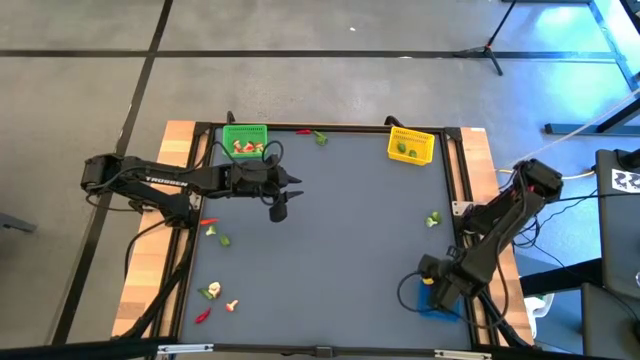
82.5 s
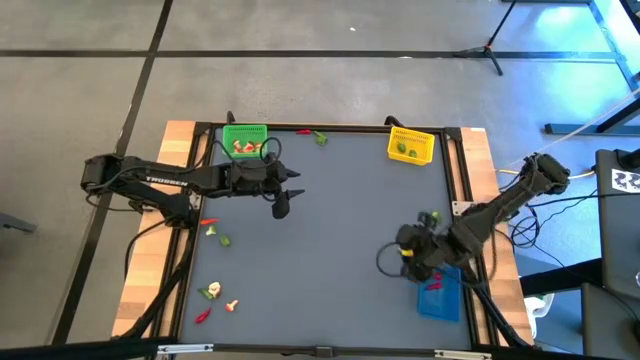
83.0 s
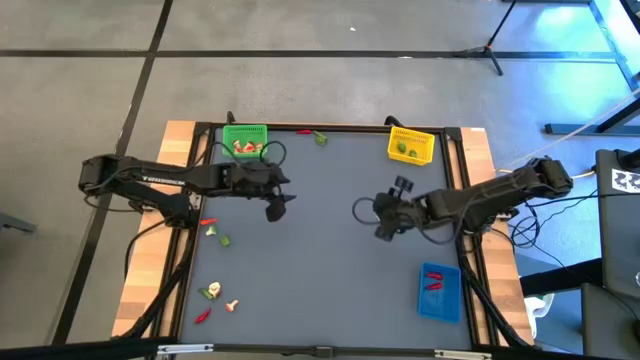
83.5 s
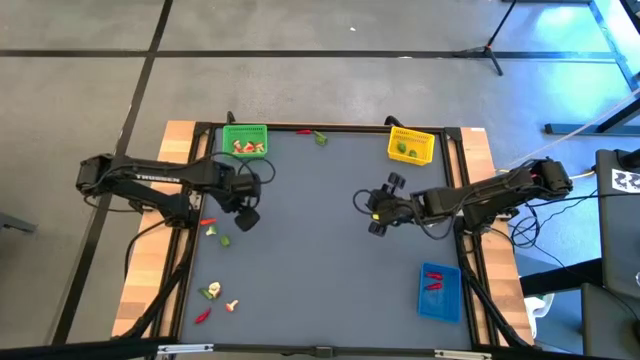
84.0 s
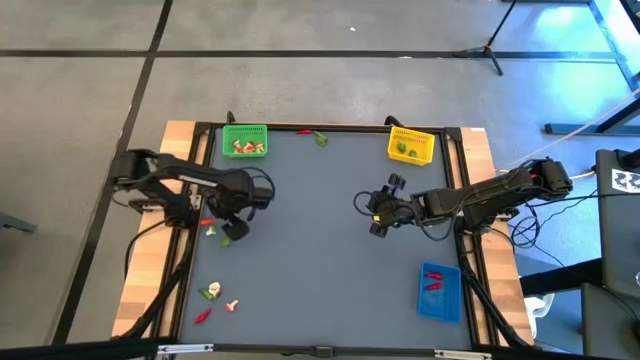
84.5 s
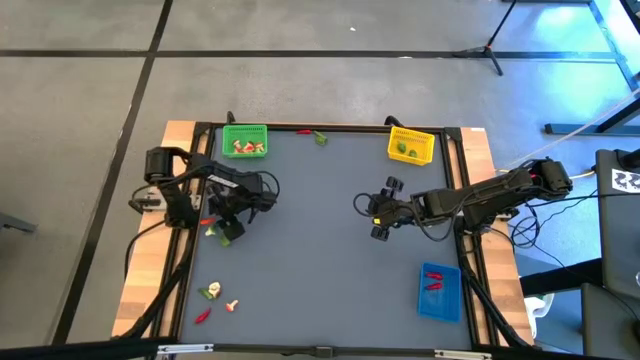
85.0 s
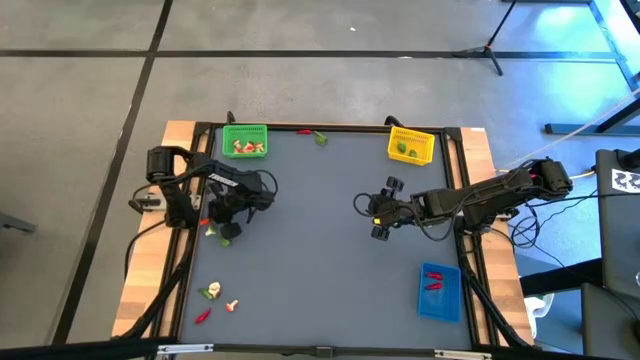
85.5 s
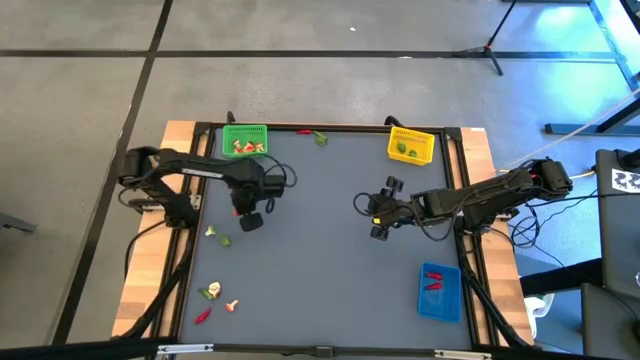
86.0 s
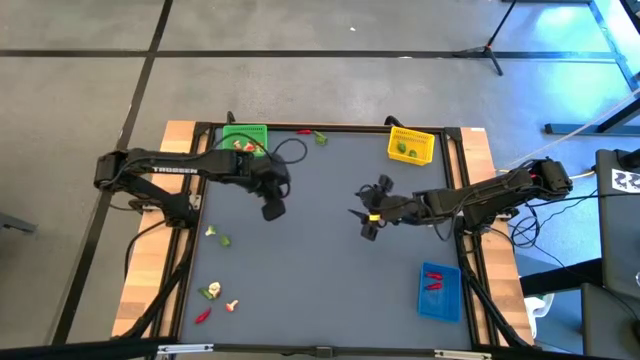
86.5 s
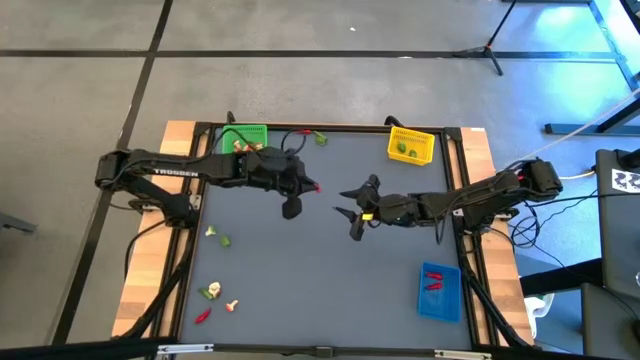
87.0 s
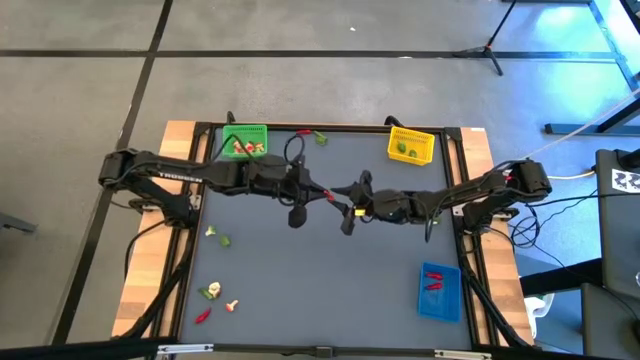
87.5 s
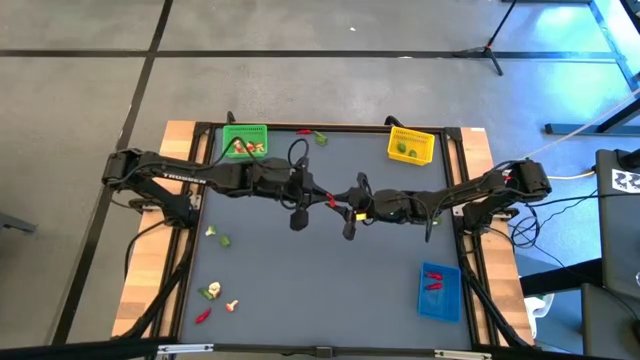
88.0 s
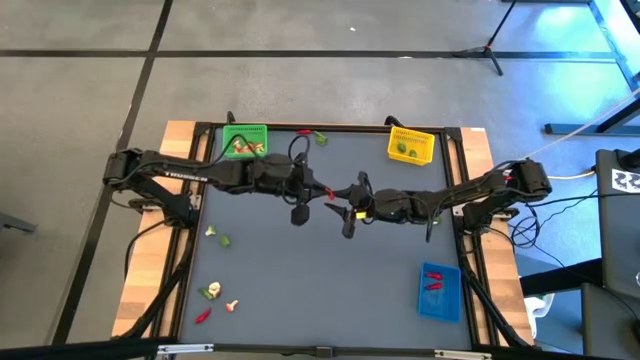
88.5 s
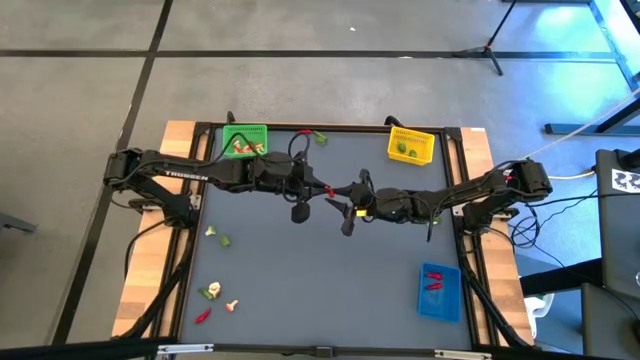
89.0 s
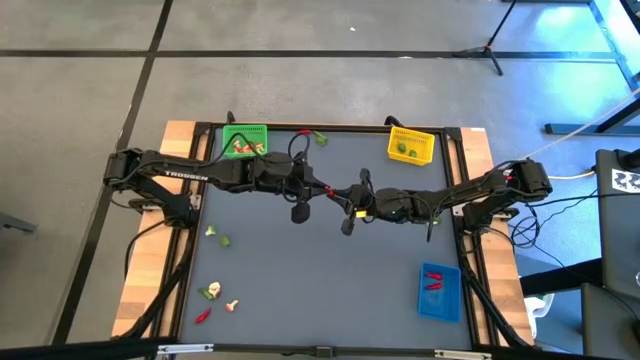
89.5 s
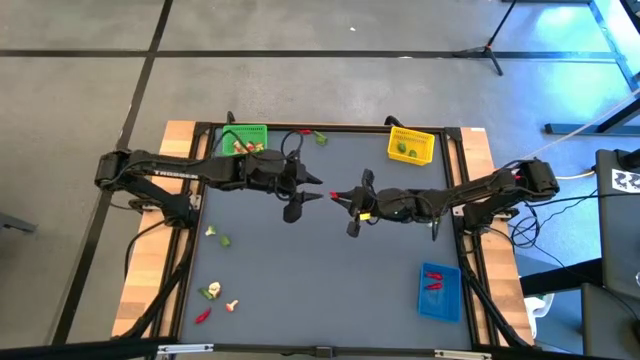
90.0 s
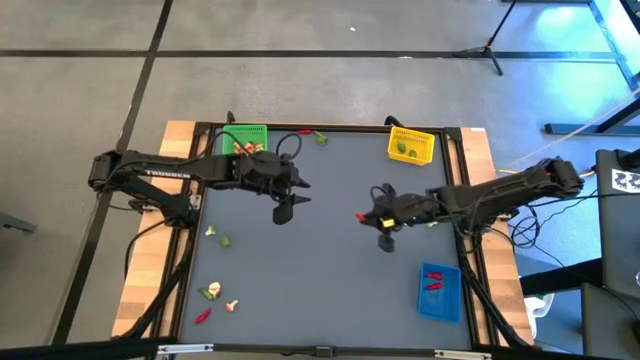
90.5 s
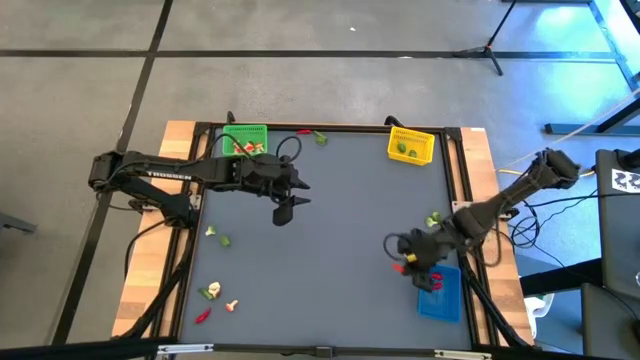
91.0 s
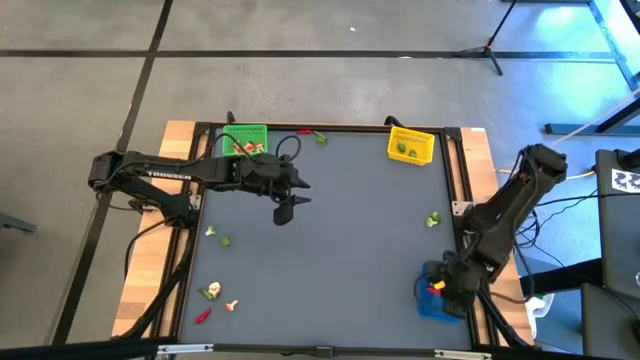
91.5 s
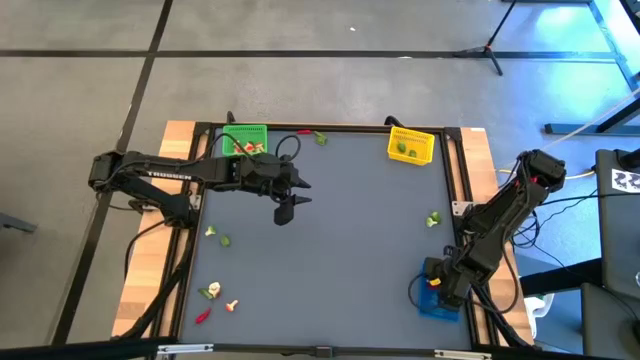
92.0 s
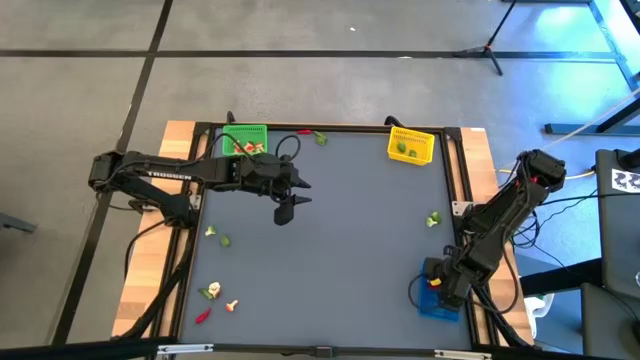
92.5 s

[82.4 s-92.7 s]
Task: Sort produce into baskets
Put the red chili pepper into the blue bin

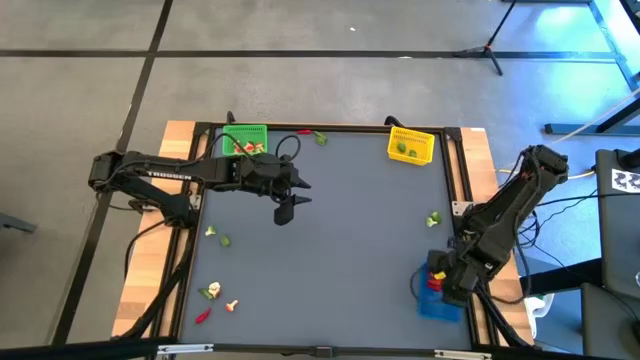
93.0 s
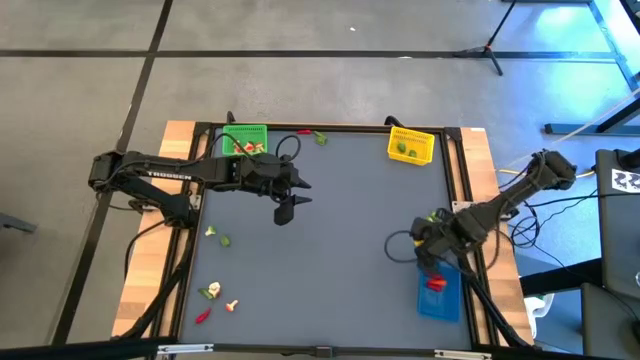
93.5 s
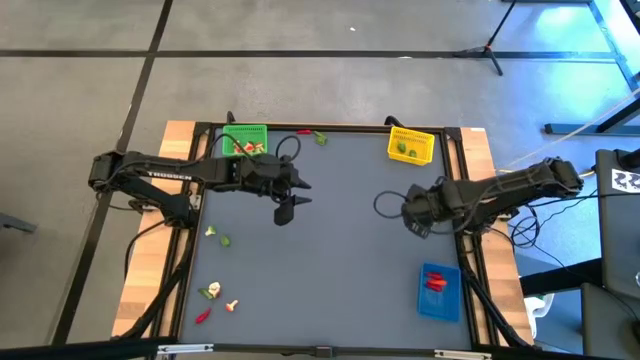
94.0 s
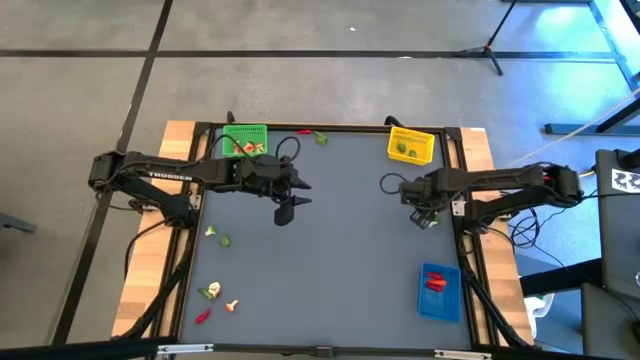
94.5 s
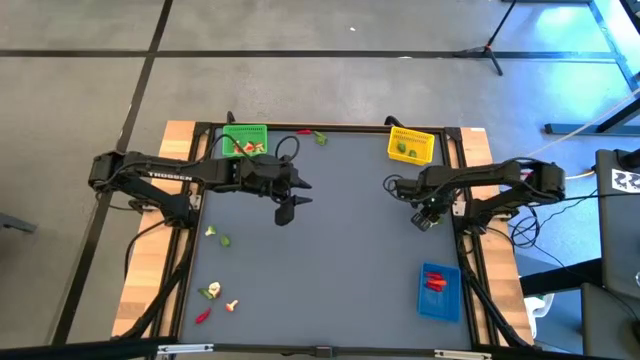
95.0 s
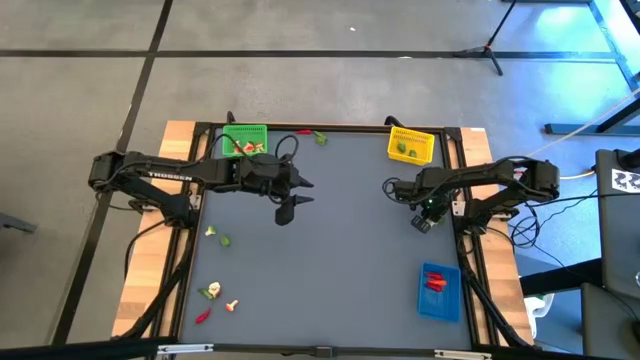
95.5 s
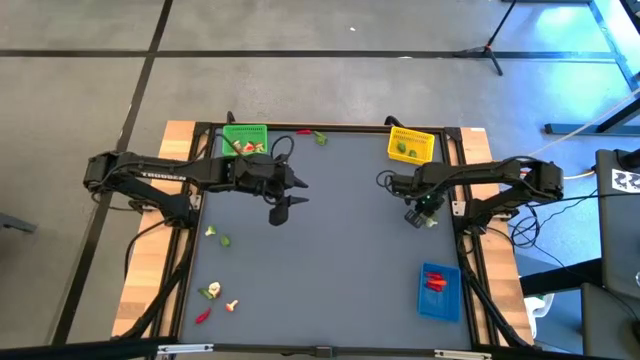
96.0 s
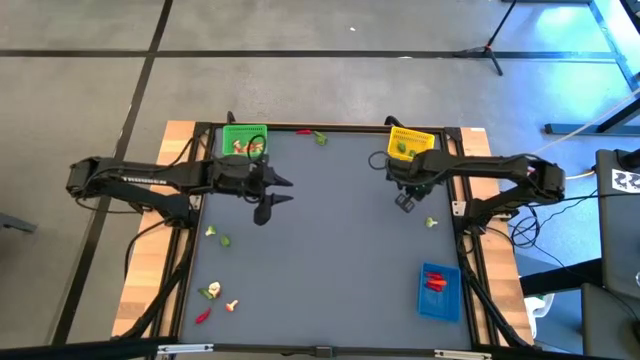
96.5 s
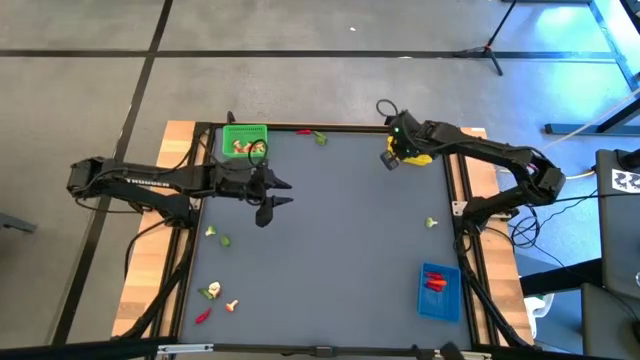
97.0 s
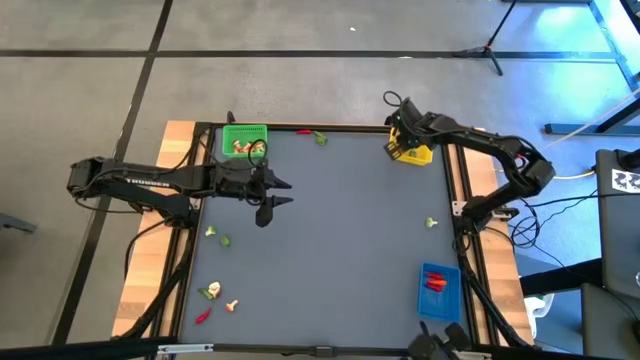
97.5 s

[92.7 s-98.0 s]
Put the green chili pepper into the yellow bin

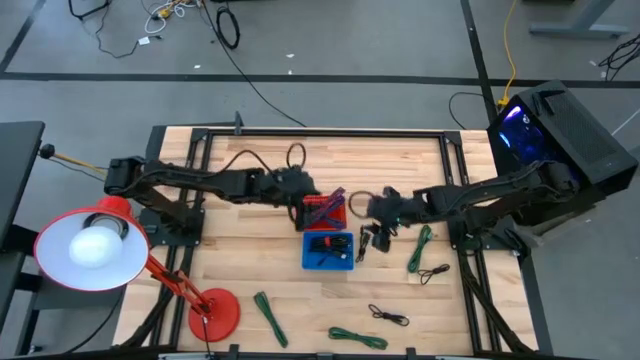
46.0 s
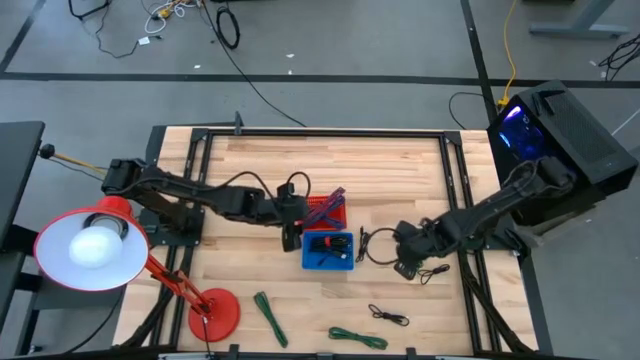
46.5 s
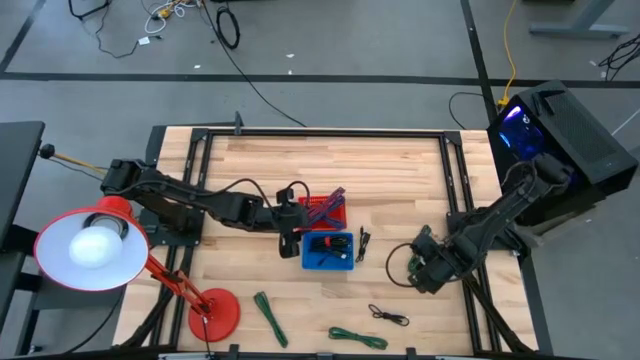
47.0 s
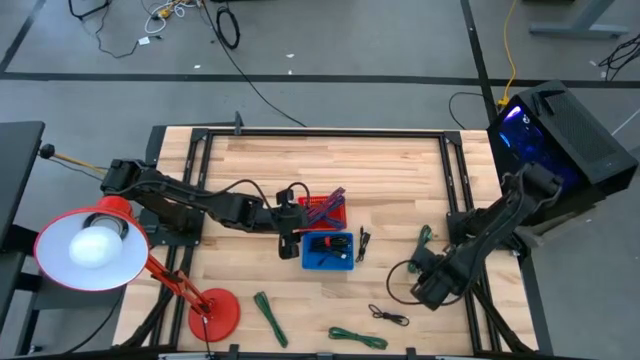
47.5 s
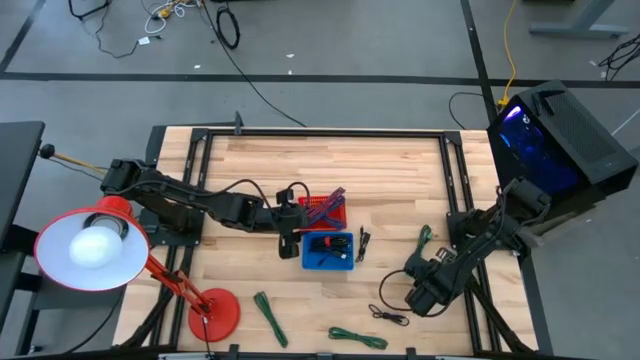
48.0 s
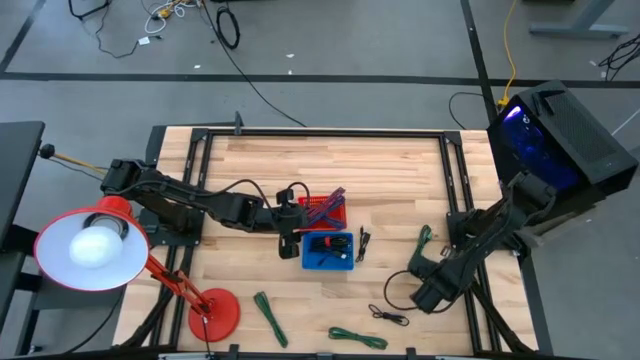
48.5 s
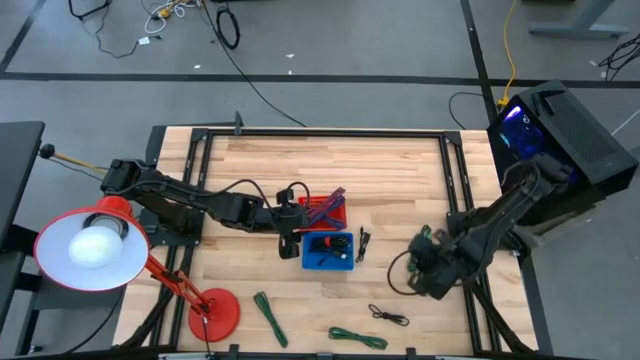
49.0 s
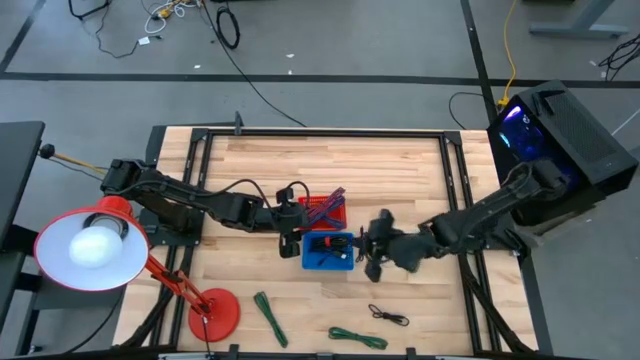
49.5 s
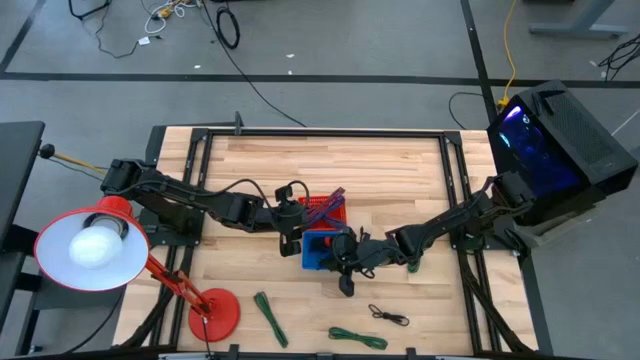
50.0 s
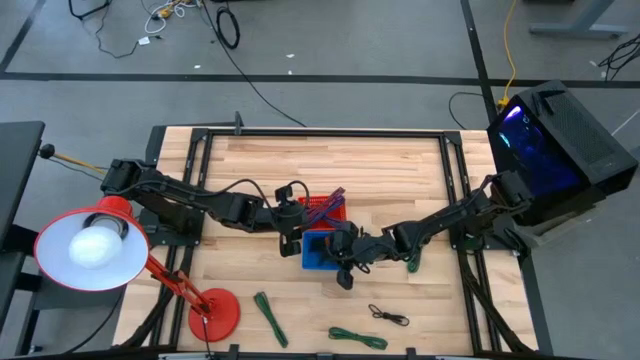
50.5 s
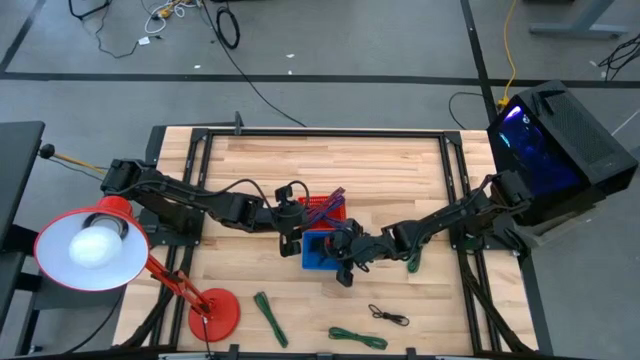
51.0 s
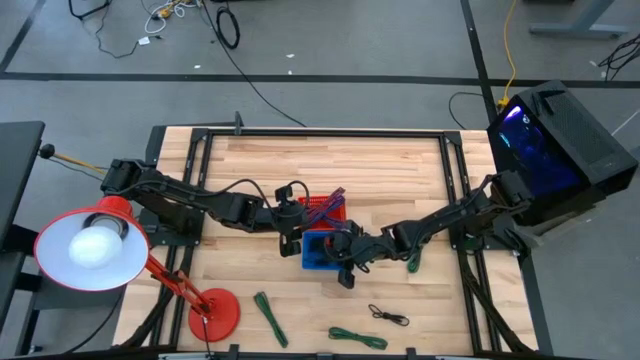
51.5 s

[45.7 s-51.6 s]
Task: Pick & Place USB Port
Put the black charger cable into the blue bin
